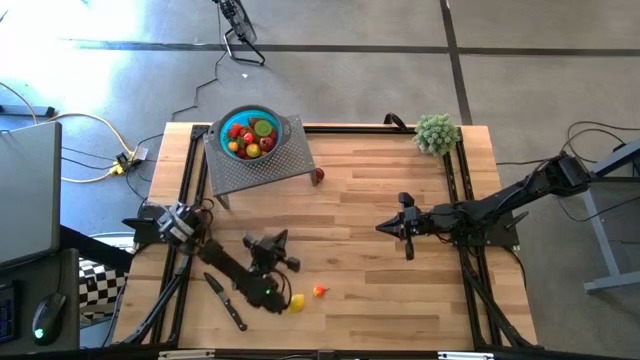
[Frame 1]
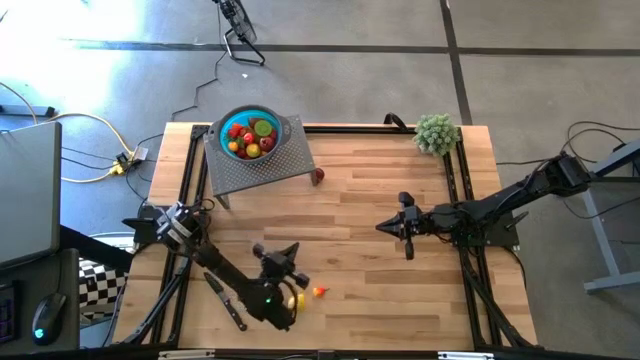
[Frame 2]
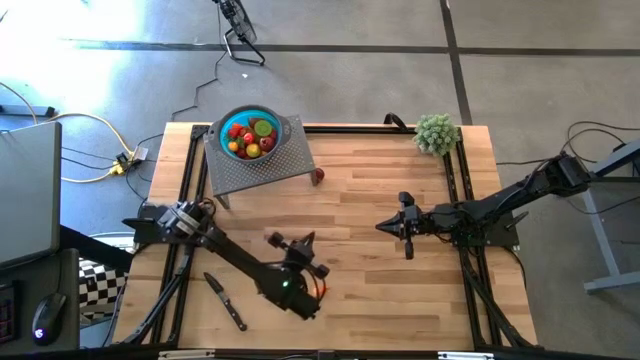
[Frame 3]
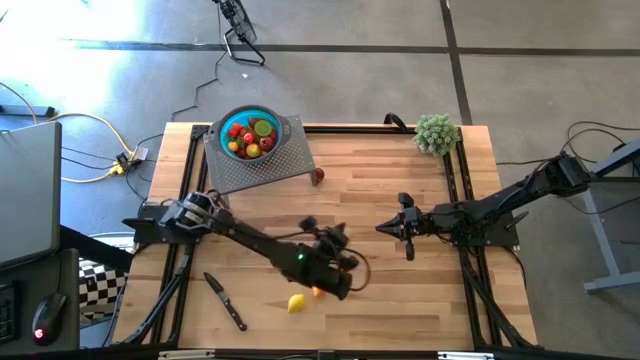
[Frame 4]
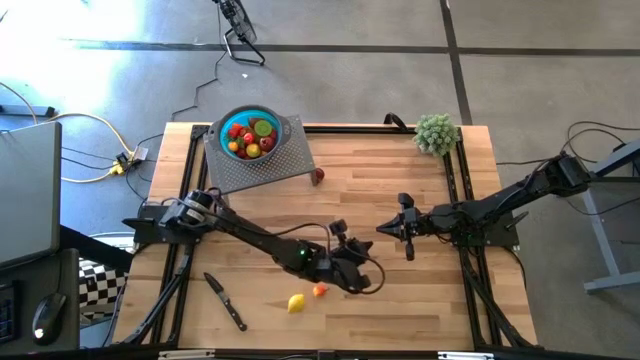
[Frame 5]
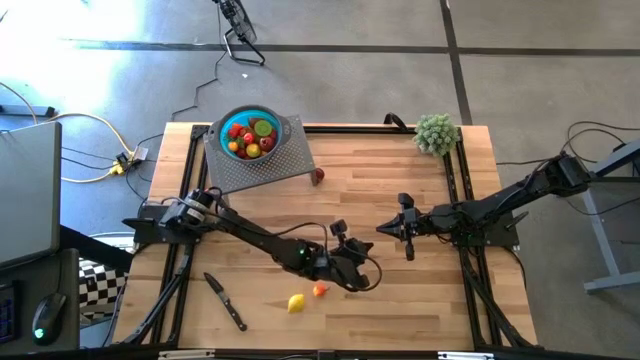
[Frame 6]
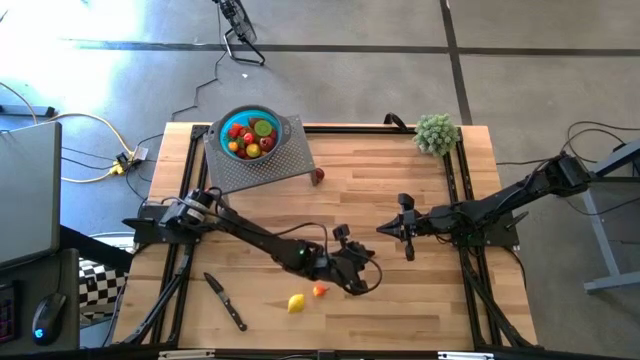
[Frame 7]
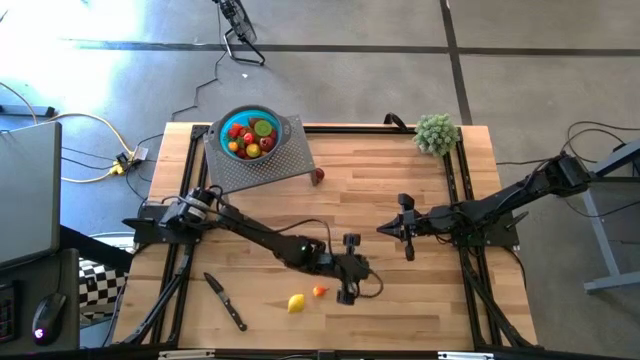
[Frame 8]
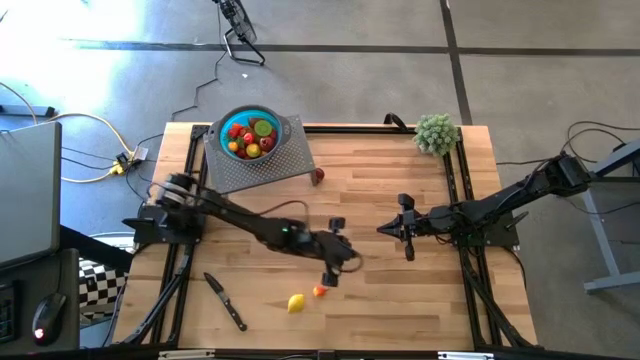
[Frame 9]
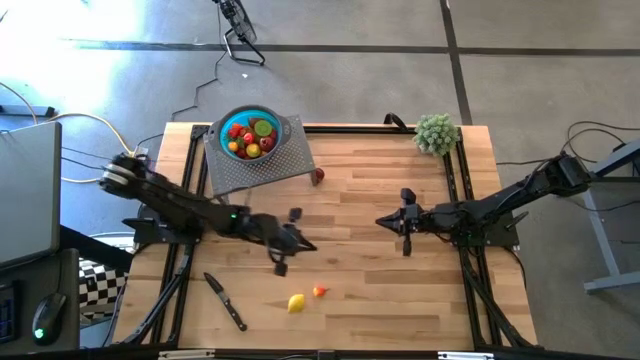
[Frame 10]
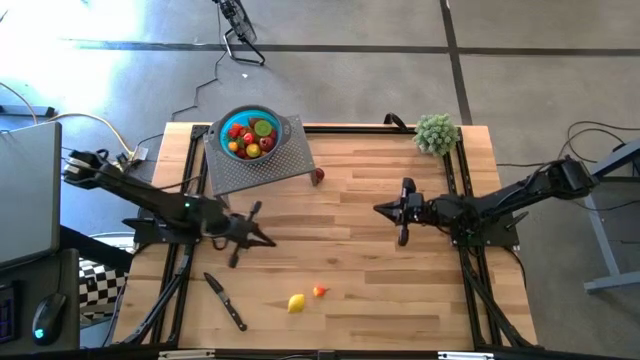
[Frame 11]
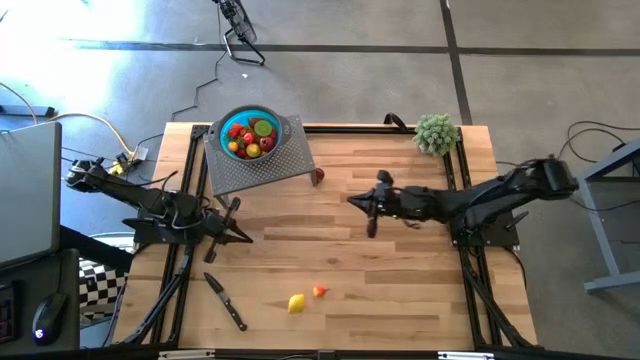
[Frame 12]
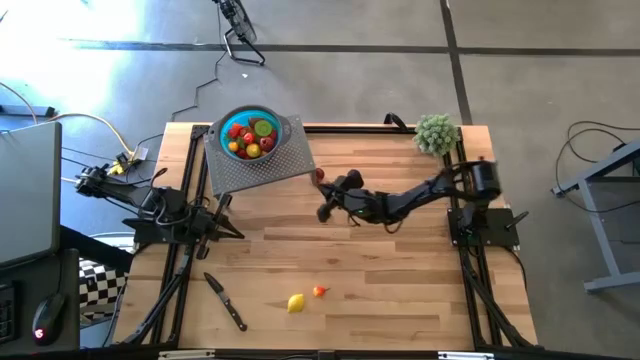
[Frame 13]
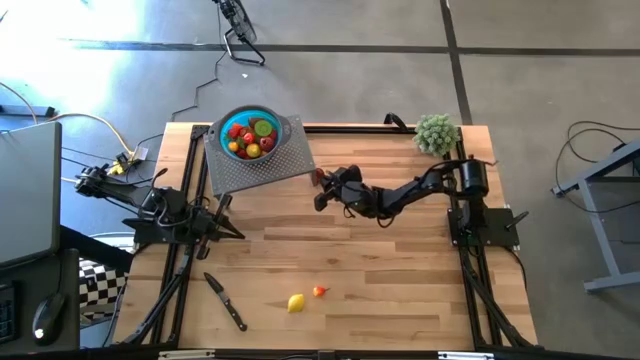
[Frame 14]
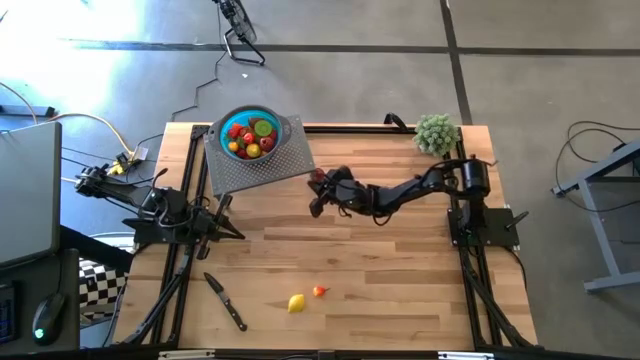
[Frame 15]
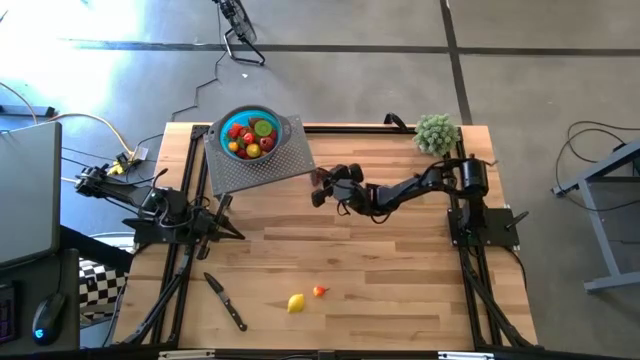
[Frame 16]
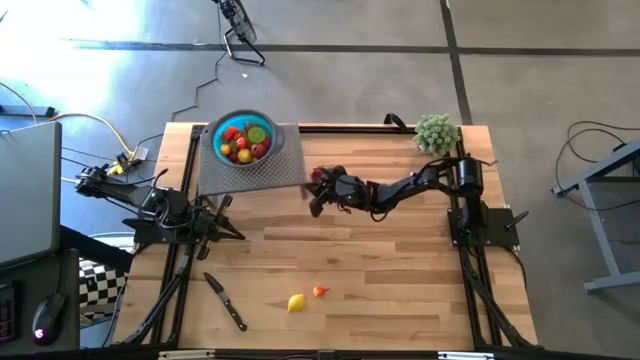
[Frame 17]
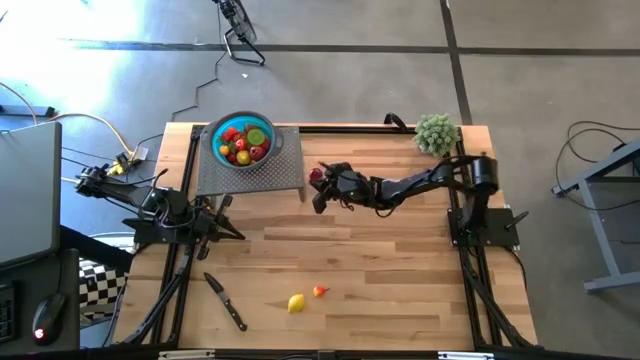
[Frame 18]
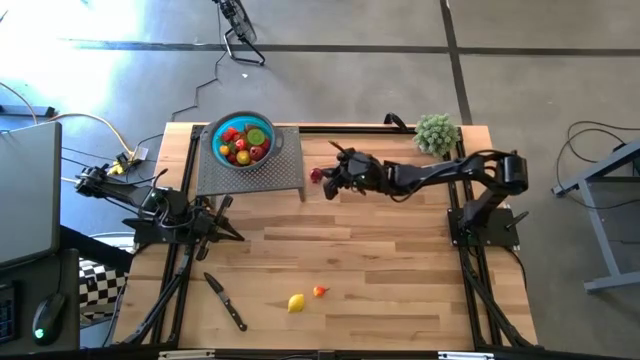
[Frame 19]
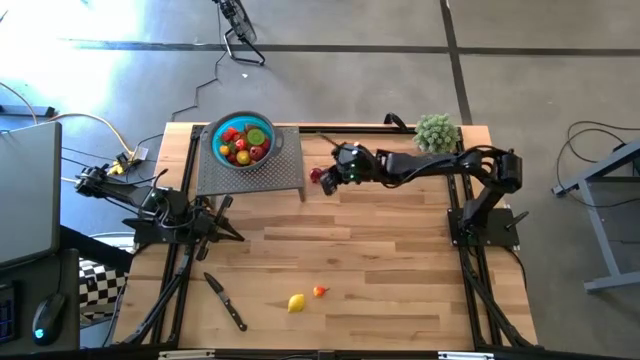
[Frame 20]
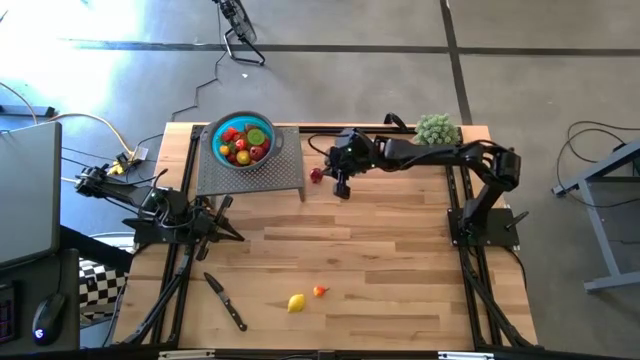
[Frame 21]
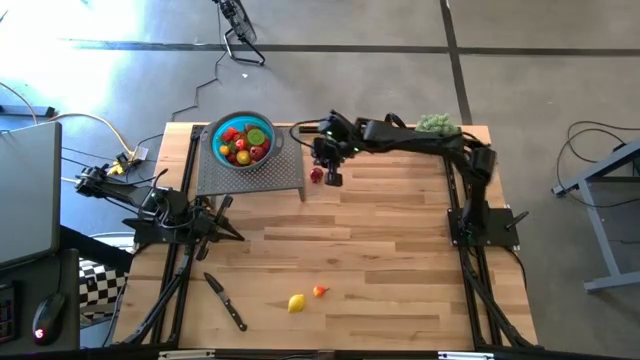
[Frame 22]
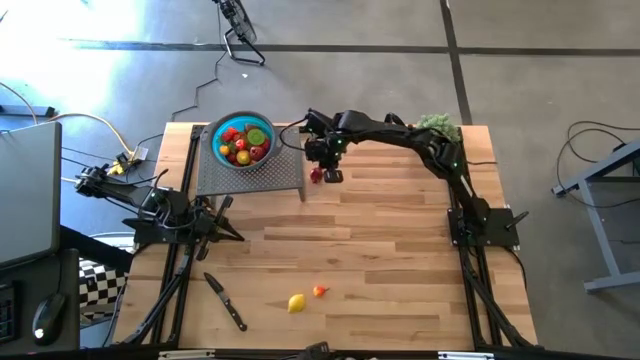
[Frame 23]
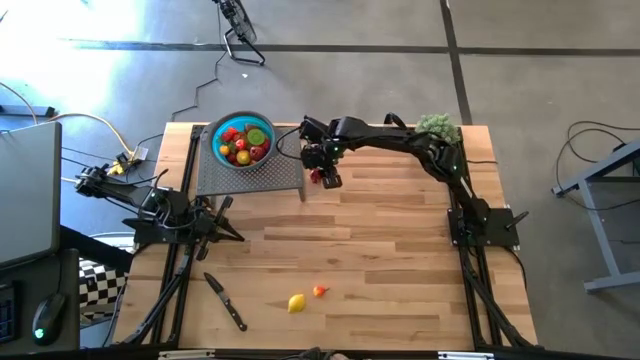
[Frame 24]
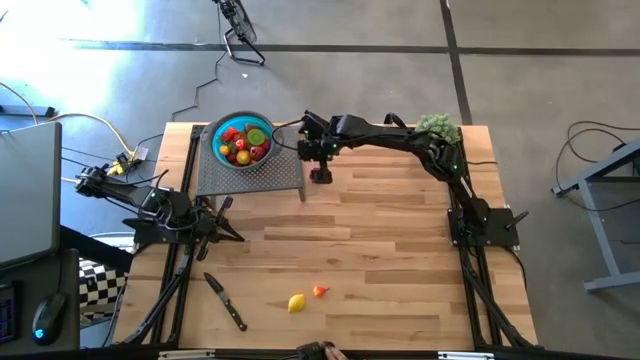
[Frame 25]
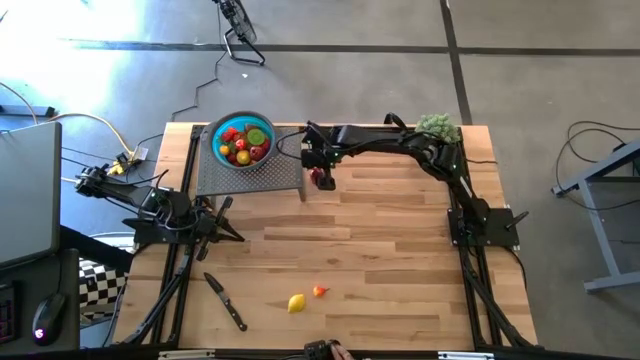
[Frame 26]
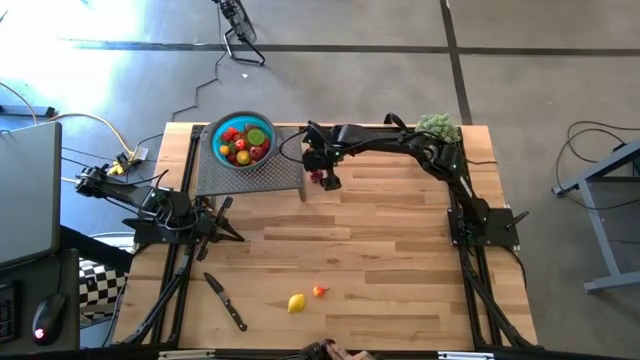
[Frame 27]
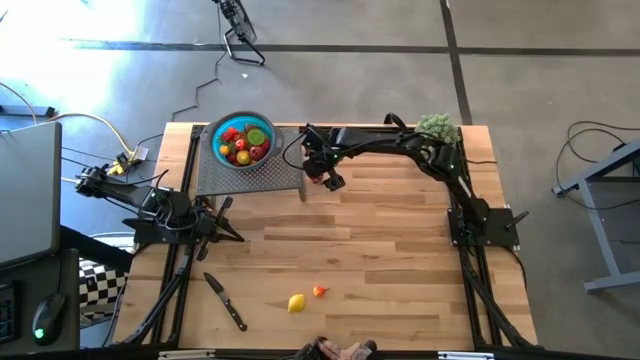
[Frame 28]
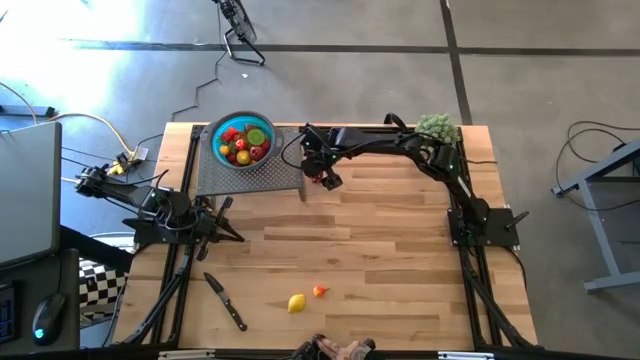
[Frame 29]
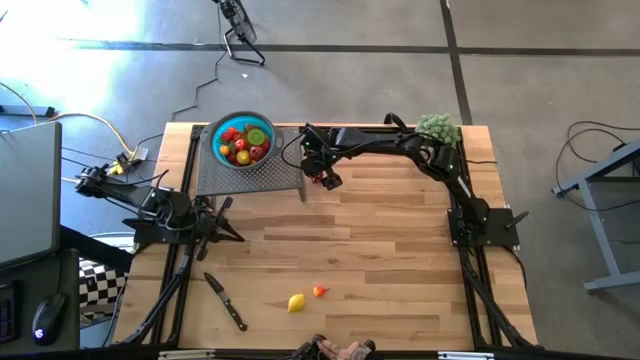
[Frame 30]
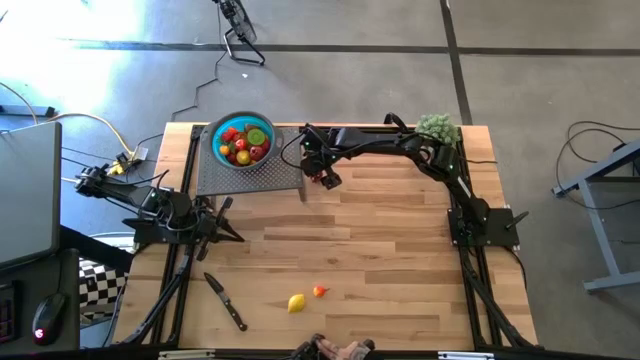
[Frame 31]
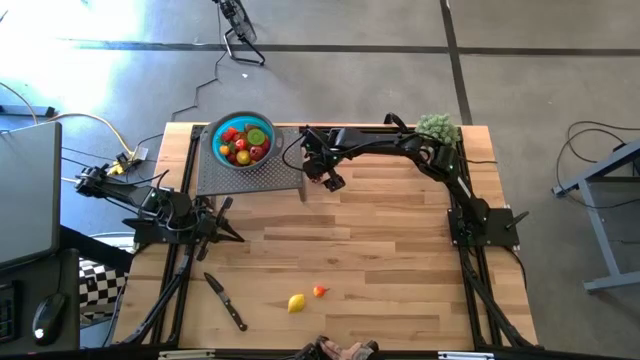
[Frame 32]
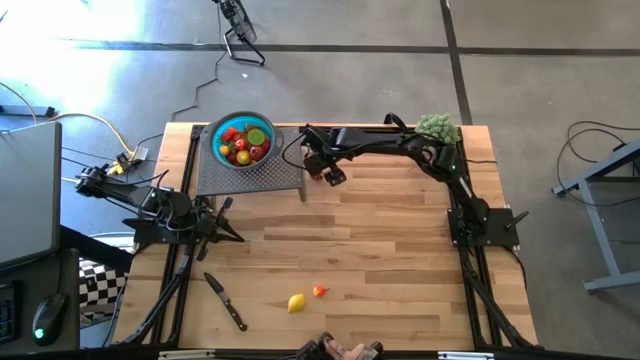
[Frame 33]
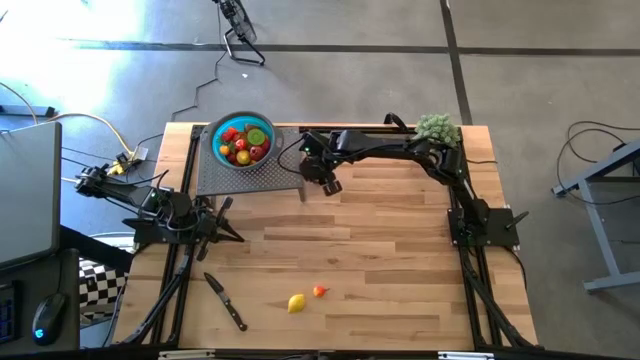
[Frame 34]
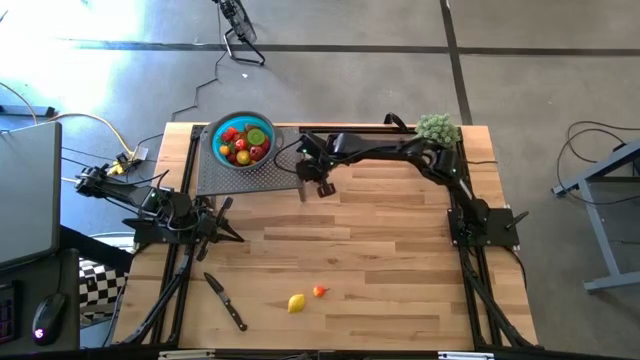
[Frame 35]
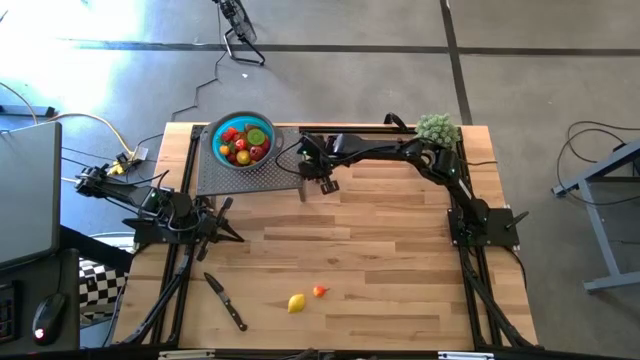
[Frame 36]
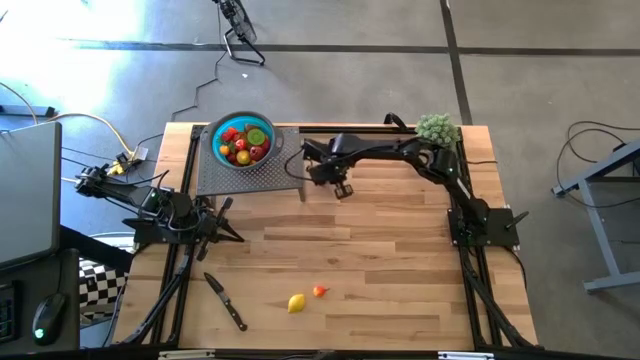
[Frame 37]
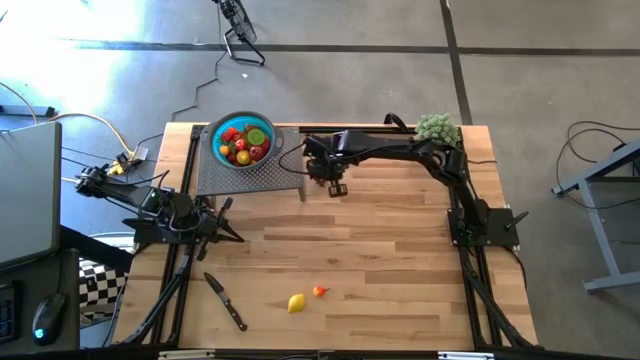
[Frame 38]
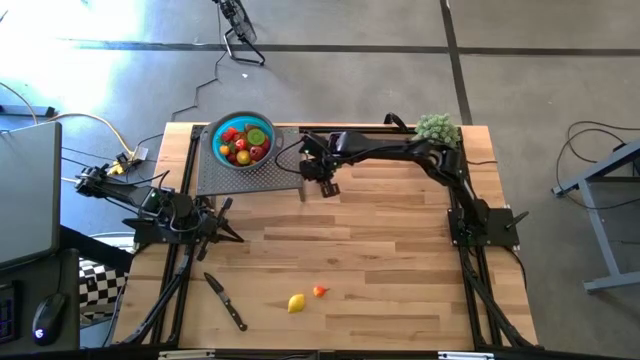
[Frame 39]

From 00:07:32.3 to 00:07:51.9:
Task: Pick & Place Fruit
Put the red pomegranate into the blue strainer bowl on the shelf
